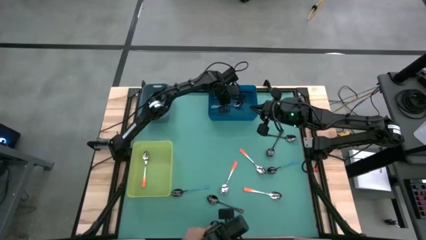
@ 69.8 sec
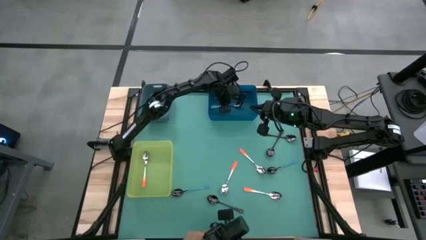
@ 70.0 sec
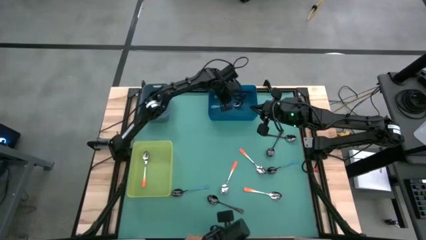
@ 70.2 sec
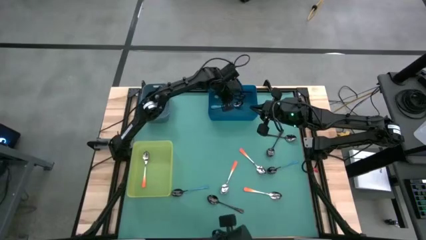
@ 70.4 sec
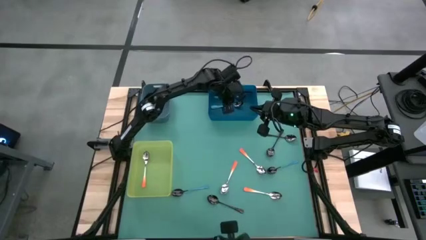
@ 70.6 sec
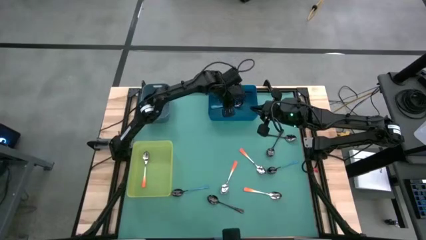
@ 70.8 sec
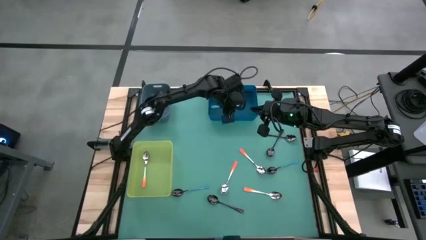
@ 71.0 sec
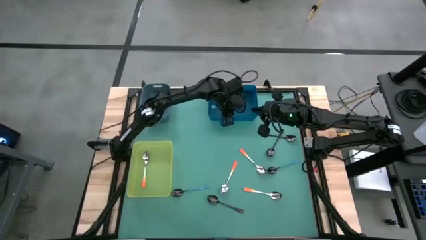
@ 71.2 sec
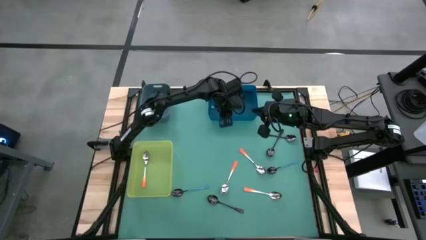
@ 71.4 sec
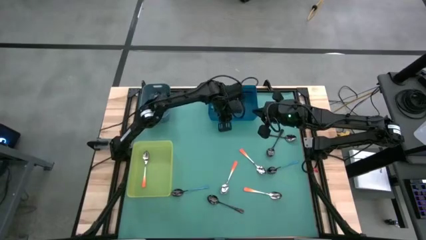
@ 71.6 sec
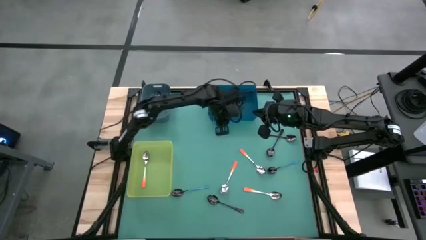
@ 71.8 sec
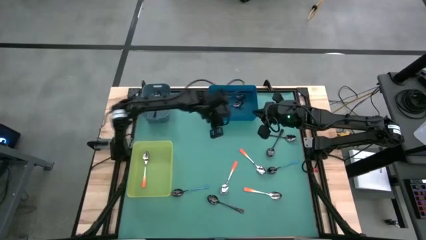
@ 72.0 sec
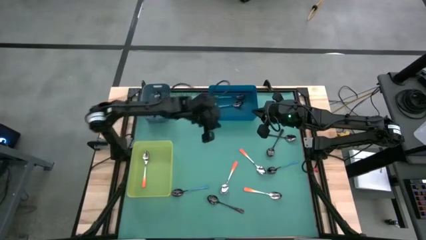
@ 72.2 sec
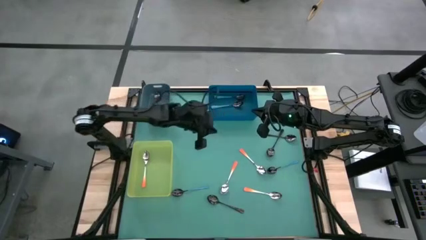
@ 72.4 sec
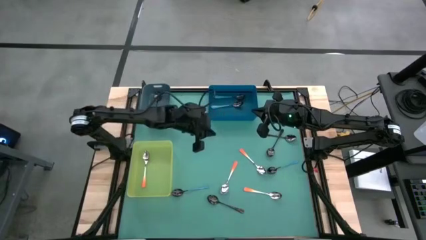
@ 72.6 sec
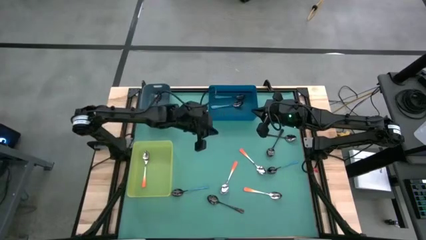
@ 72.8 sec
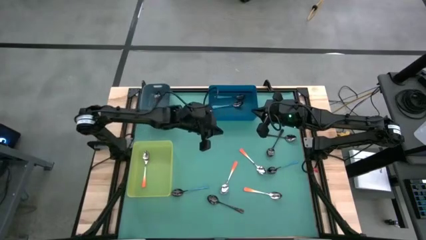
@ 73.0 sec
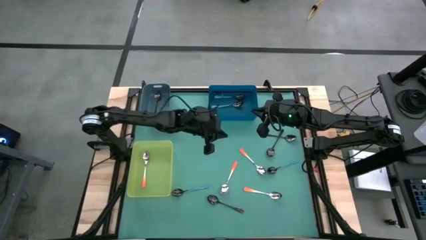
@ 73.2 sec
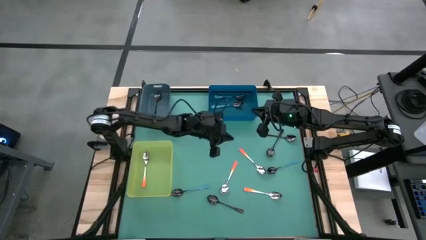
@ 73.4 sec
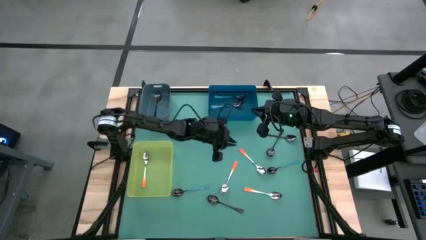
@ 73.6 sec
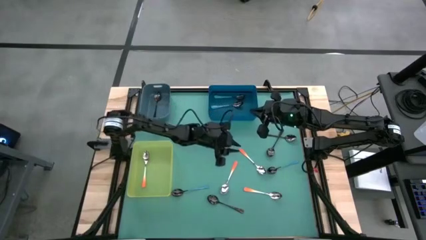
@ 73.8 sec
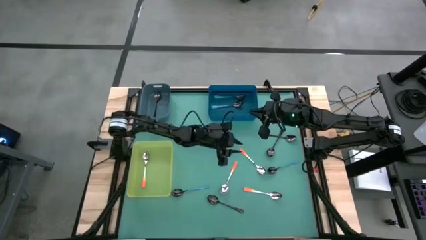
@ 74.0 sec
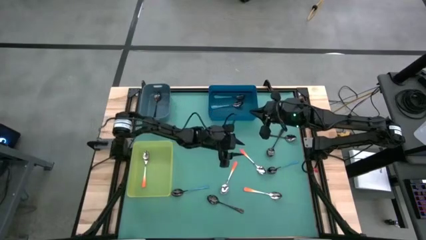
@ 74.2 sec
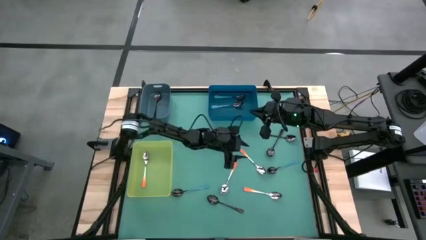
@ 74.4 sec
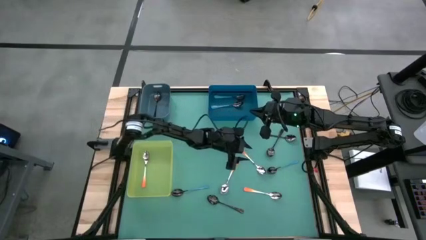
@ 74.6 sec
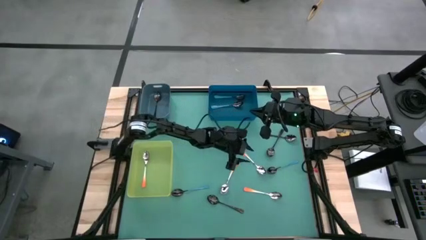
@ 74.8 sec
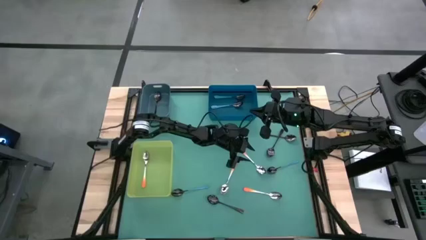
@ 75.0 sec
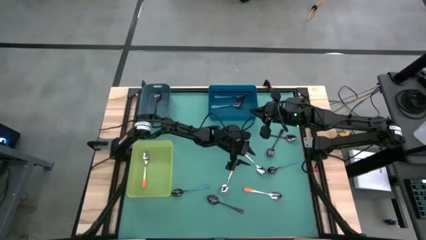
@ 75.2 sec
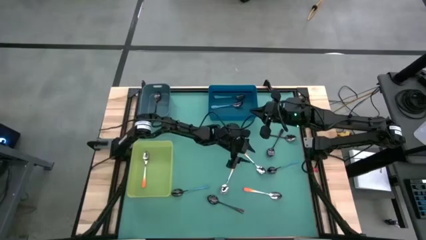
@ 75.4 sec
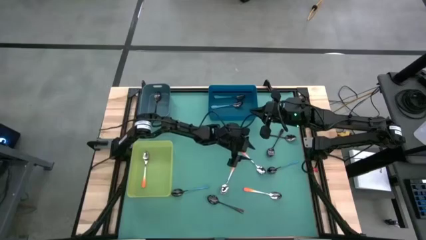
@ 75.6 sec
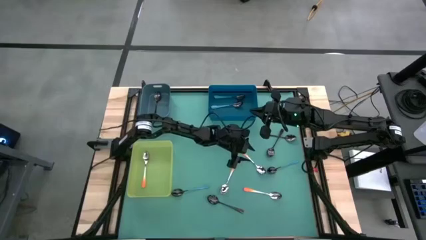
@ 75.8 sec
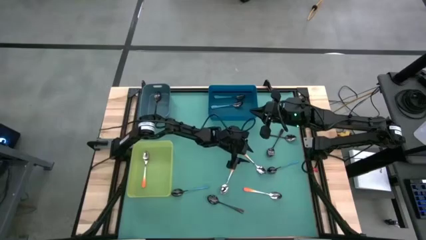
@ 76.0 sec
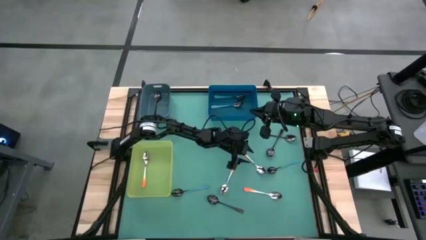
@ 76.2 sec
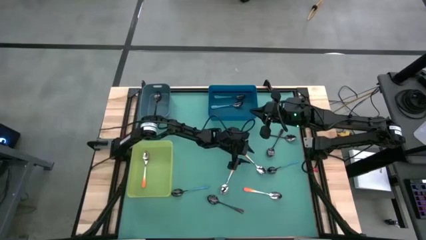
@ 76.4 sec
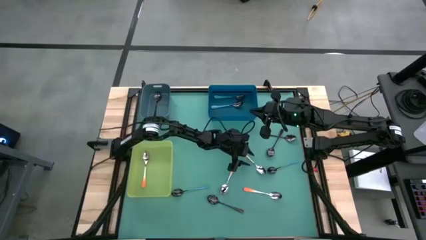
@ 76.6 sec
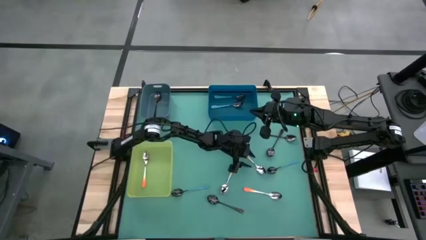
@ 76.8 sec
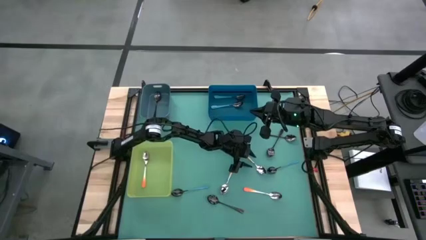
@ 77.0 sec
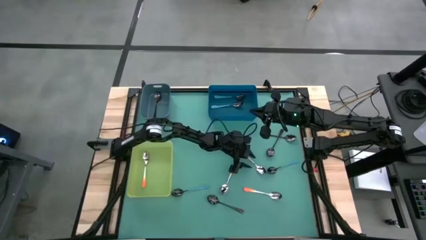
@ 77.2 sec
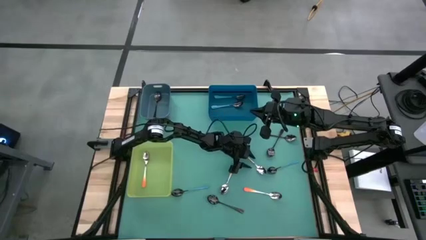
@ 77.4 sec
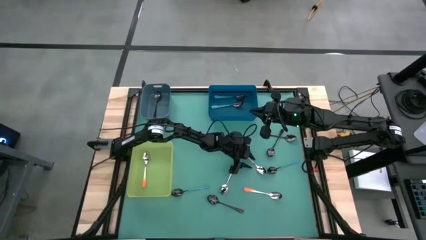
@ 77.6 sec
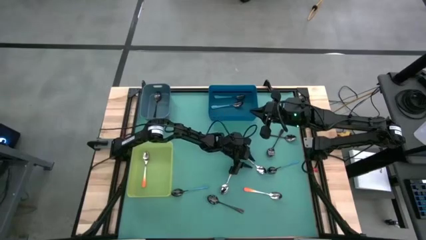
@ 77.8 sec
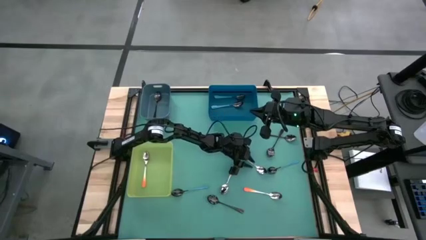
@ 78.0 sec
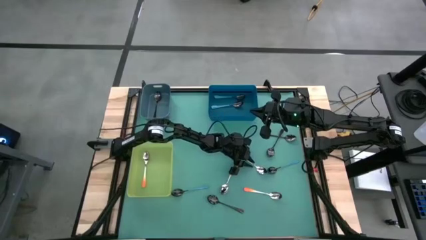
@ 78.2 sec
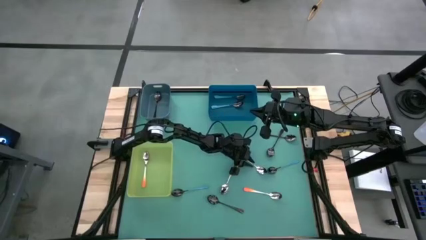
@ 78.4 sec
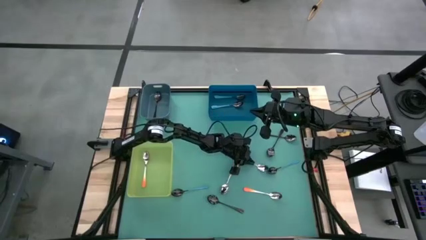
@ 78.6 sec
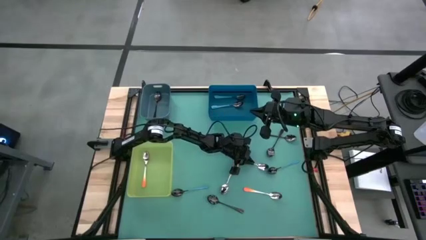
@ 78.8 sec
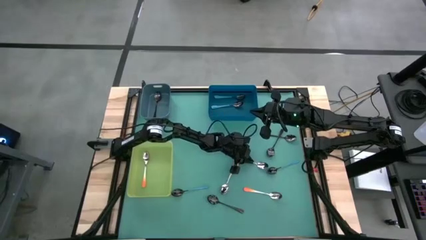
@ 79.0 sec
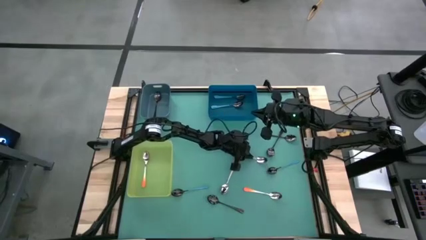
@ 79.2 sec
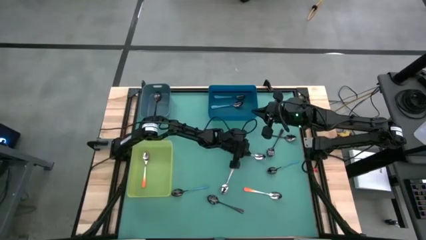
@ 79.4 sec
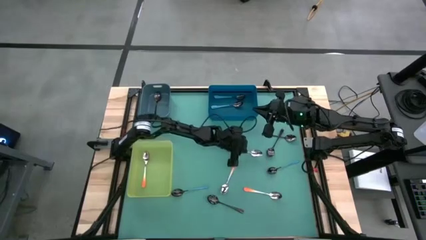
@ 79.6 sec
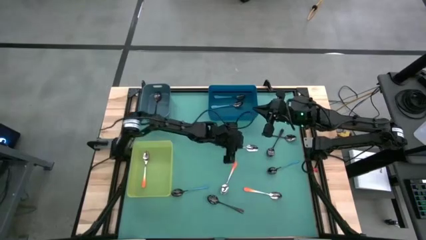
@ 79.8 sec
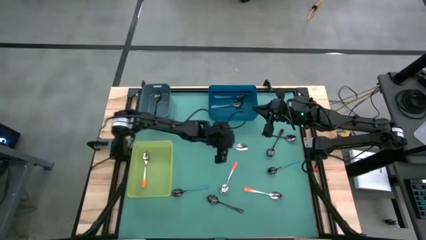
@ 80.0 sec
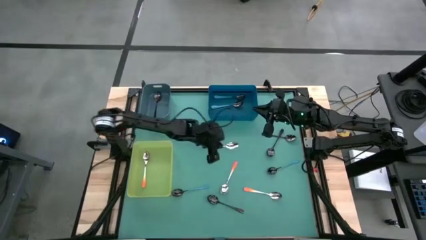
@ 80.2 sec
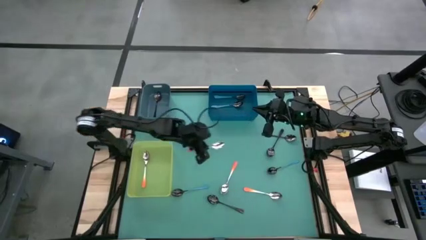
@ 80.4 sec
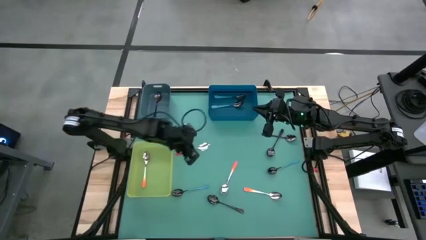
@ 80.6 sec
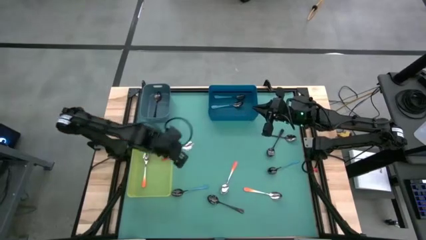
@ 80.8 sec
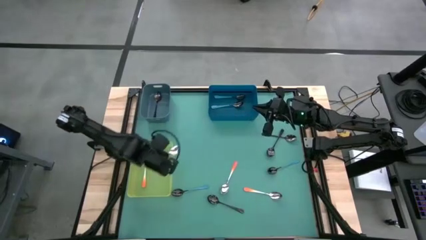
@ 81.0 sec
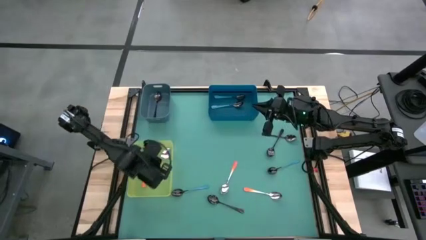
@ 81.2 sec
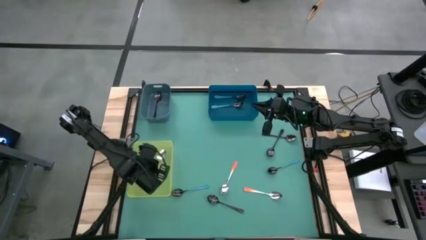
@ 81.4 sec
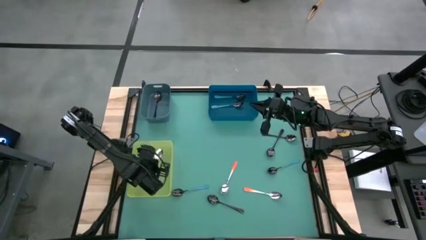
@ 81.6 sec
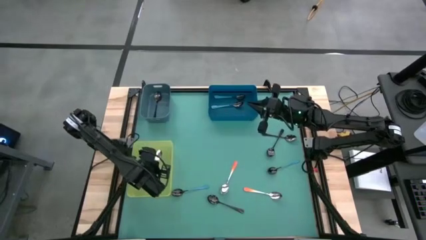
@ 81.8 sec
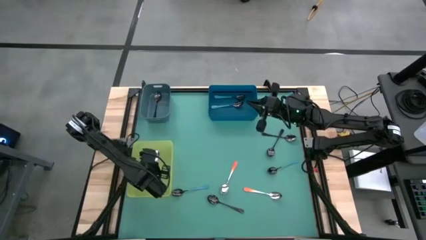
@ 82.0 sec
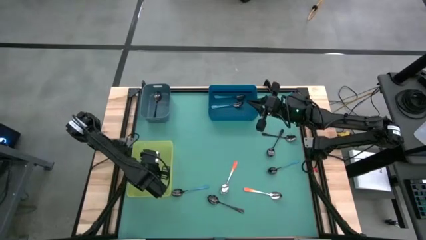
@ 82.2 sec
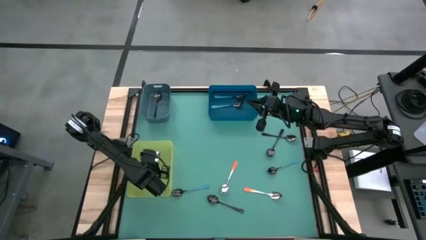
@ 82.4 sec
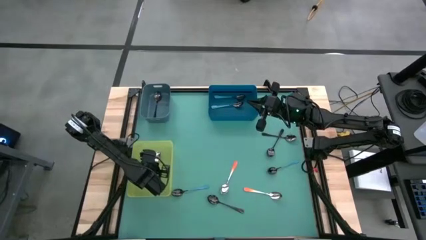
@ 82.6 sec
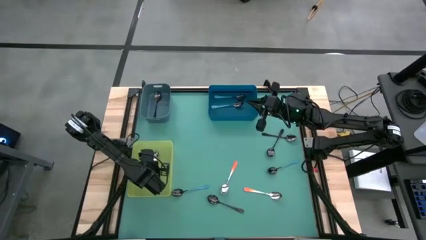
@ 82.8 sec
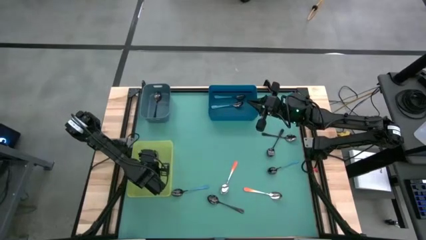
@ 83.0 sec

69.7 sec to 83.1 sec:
Task: Sort silverware by color (type)
Put the orange spoon into the yellow bin
